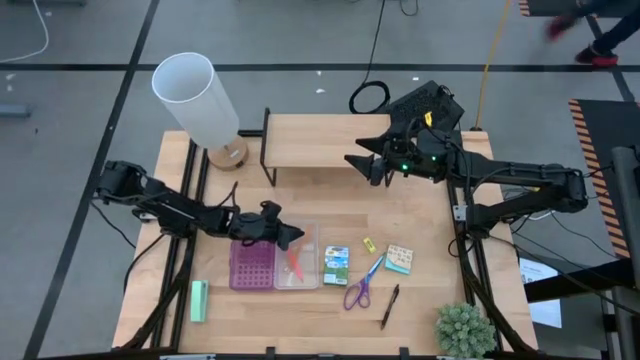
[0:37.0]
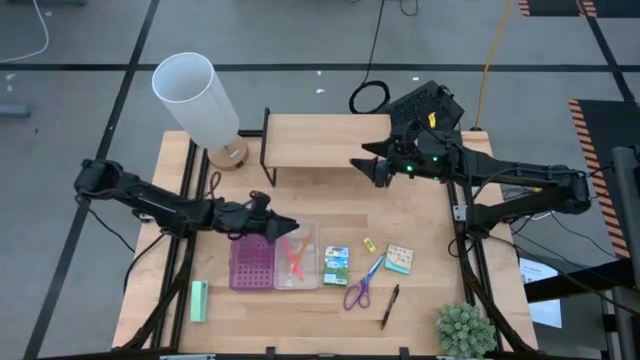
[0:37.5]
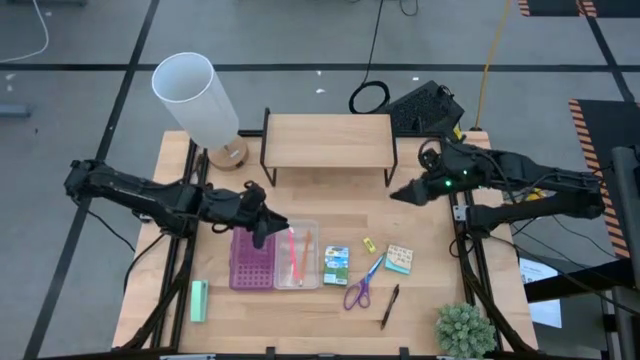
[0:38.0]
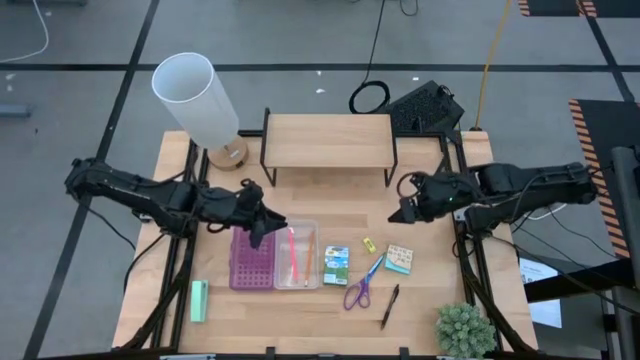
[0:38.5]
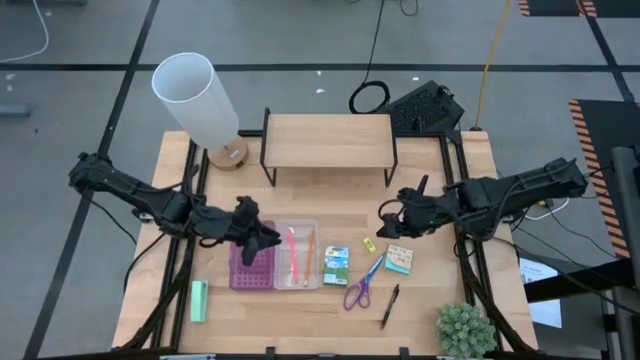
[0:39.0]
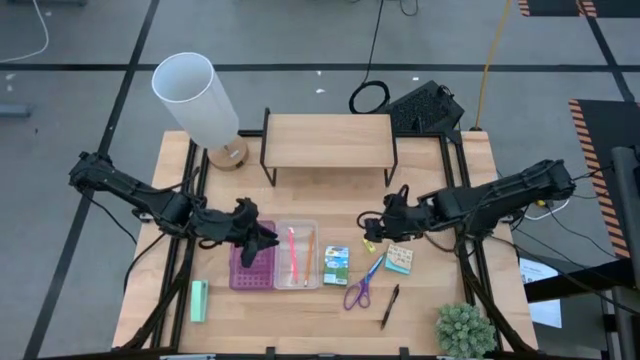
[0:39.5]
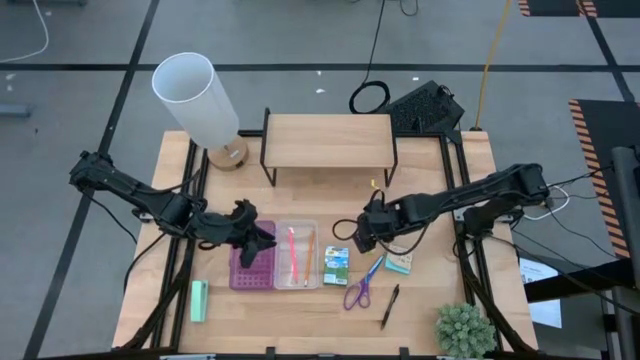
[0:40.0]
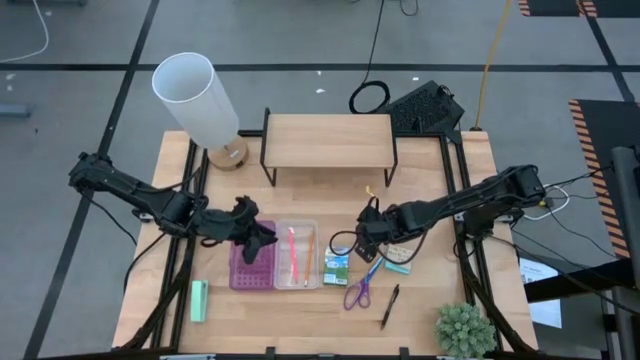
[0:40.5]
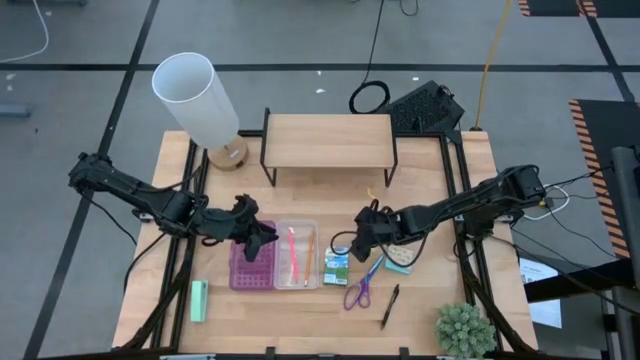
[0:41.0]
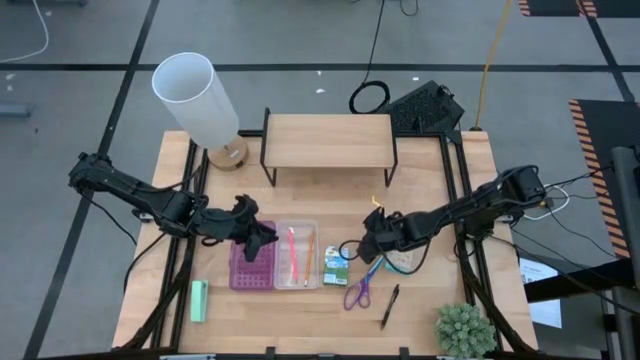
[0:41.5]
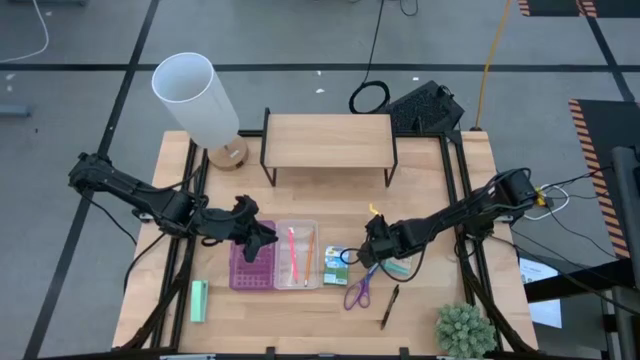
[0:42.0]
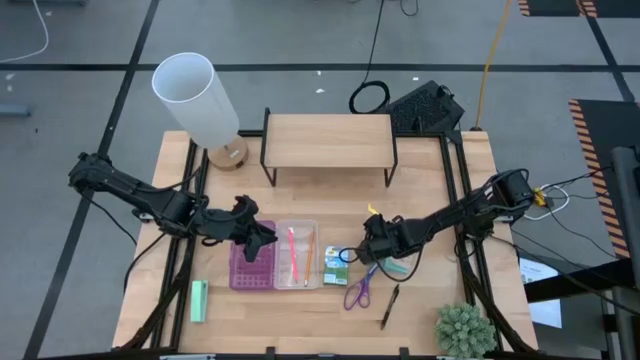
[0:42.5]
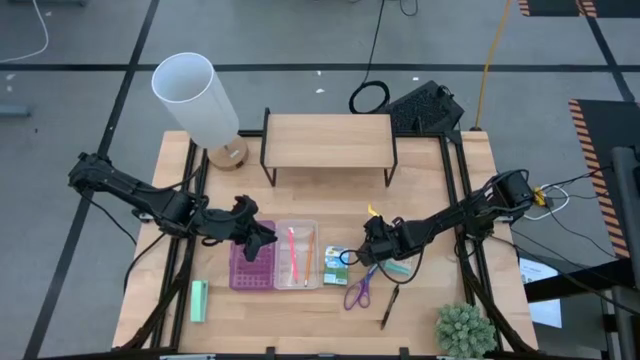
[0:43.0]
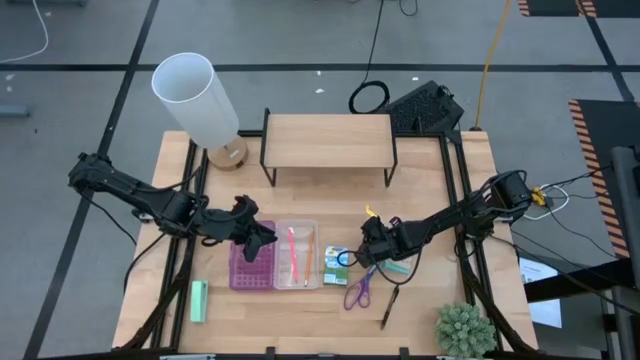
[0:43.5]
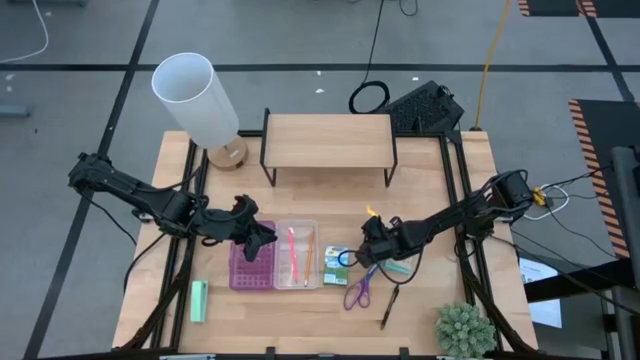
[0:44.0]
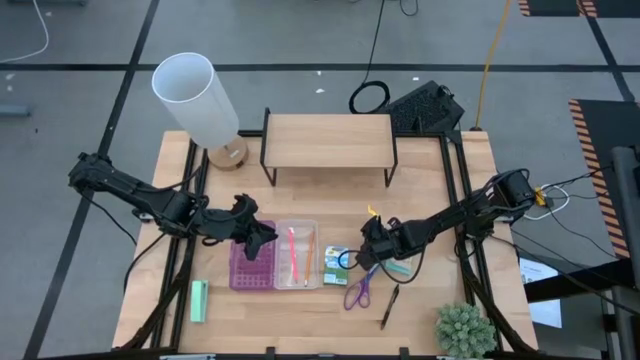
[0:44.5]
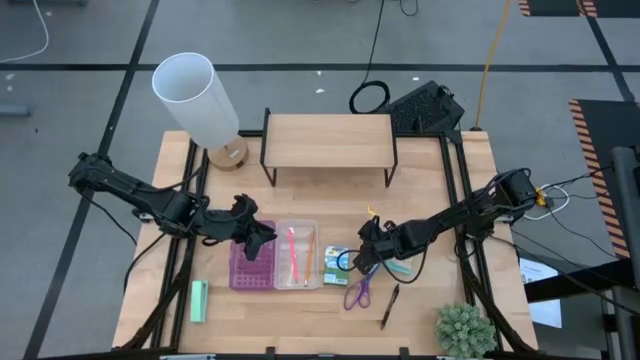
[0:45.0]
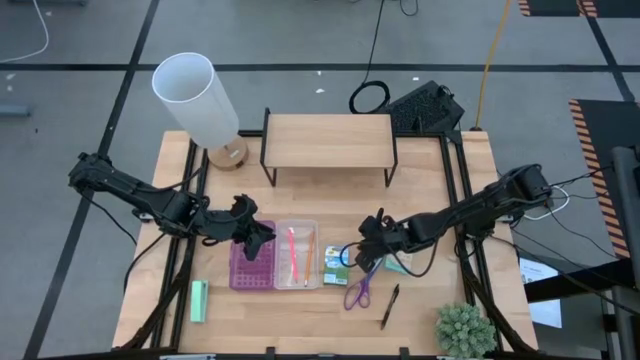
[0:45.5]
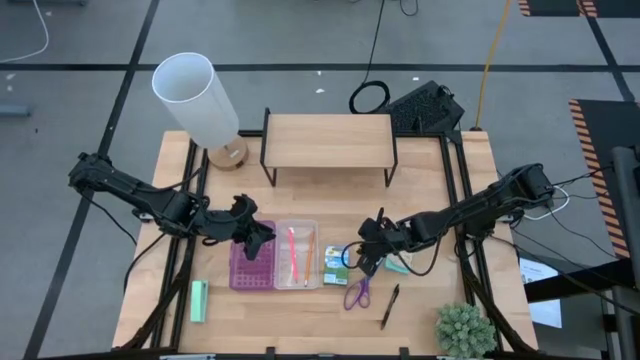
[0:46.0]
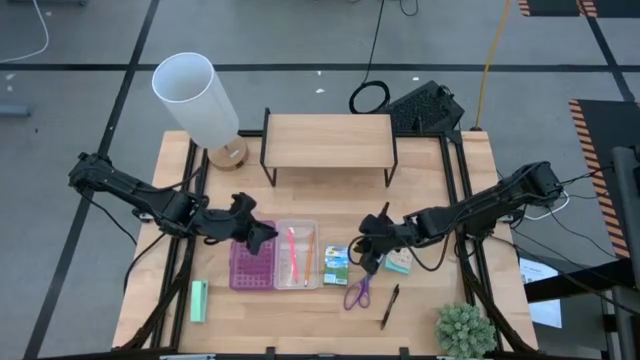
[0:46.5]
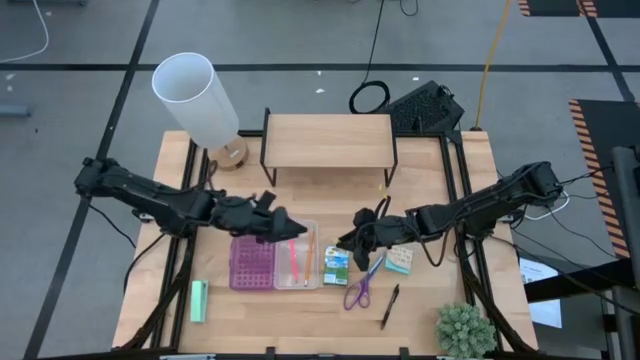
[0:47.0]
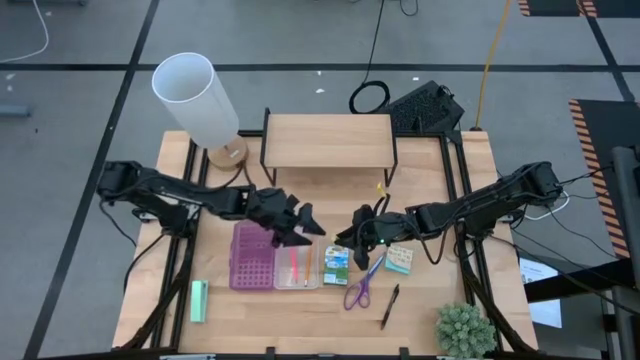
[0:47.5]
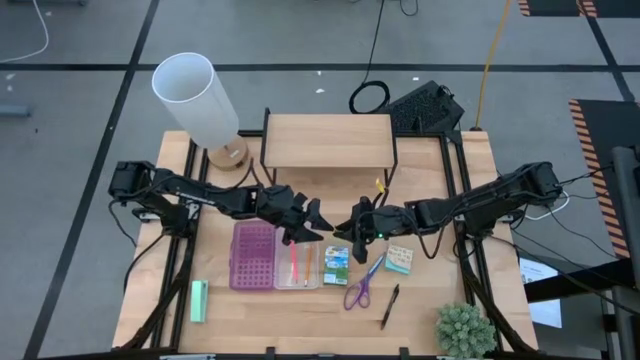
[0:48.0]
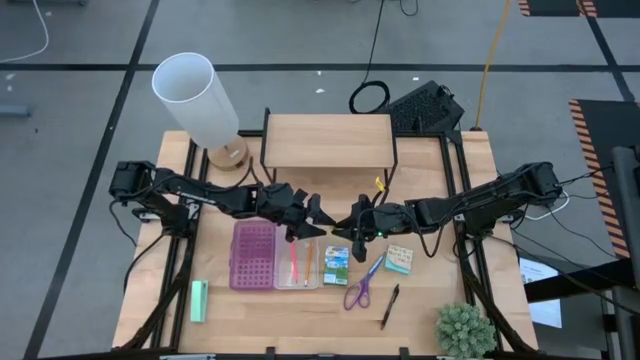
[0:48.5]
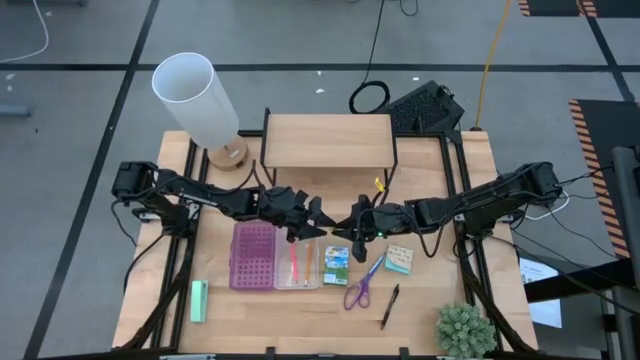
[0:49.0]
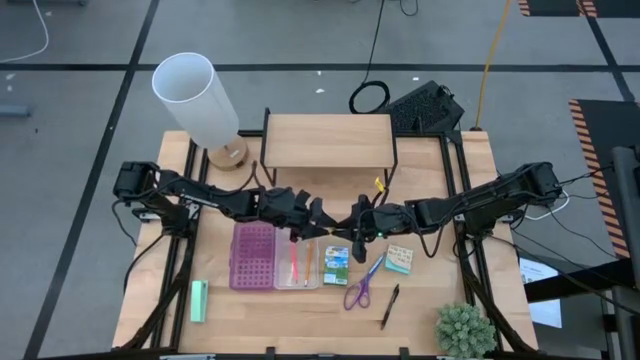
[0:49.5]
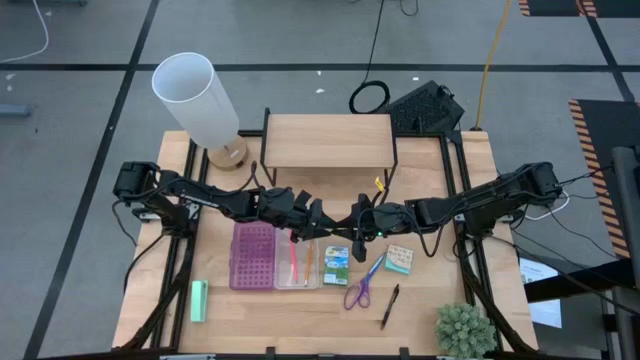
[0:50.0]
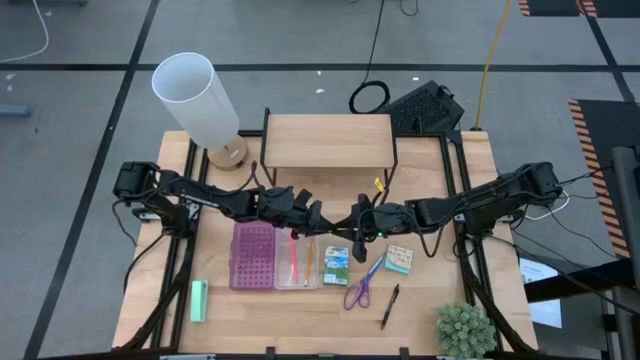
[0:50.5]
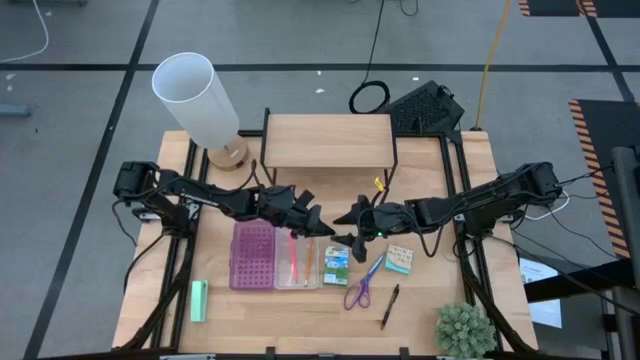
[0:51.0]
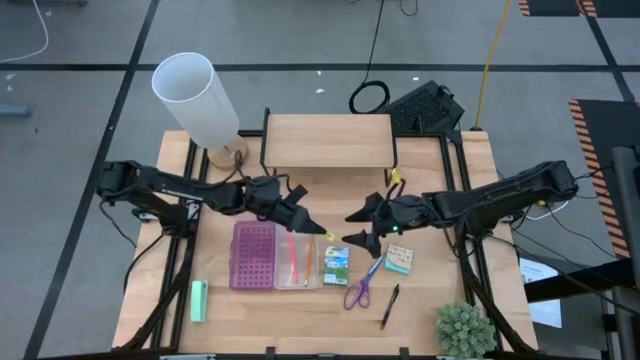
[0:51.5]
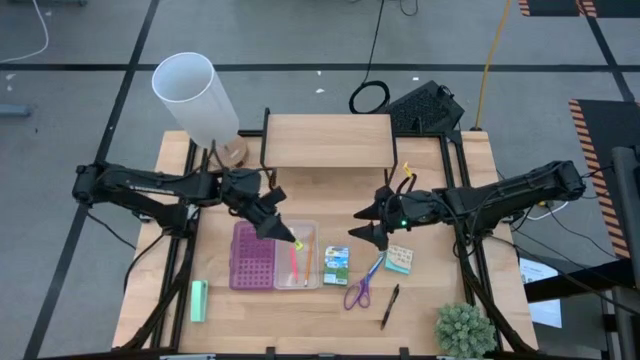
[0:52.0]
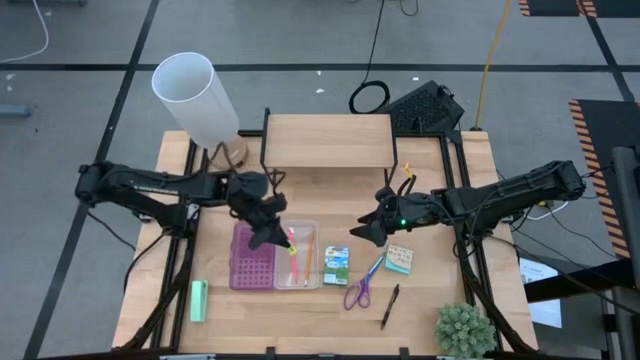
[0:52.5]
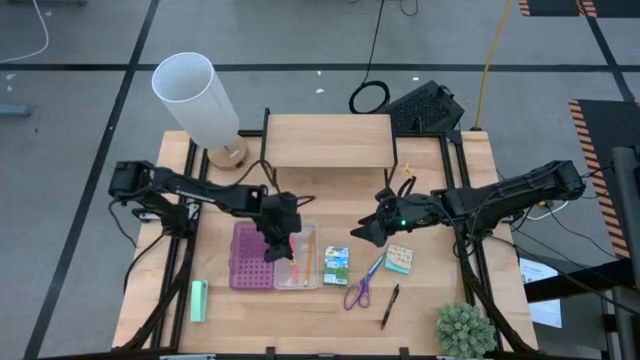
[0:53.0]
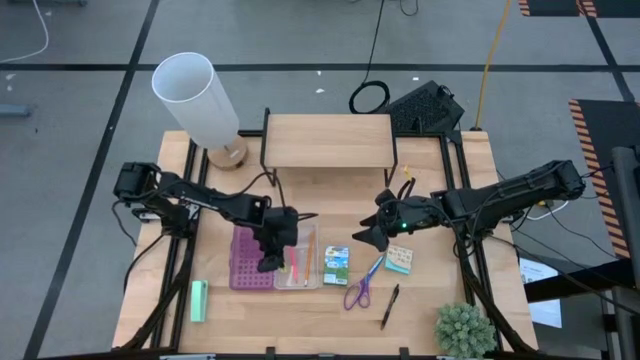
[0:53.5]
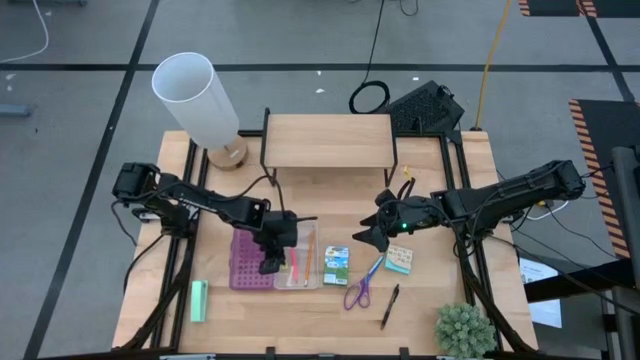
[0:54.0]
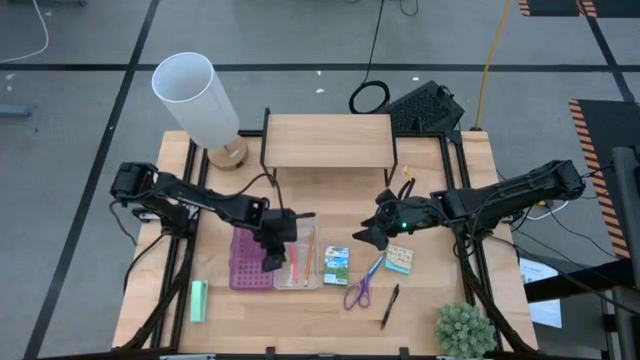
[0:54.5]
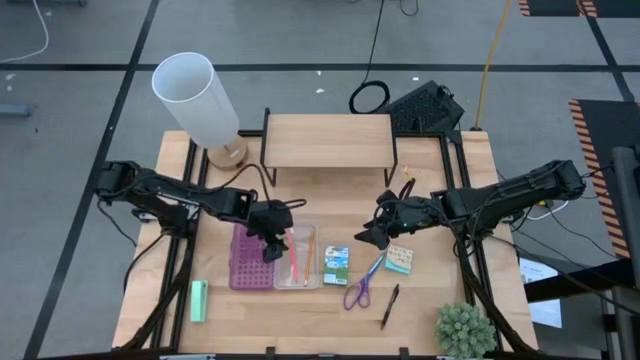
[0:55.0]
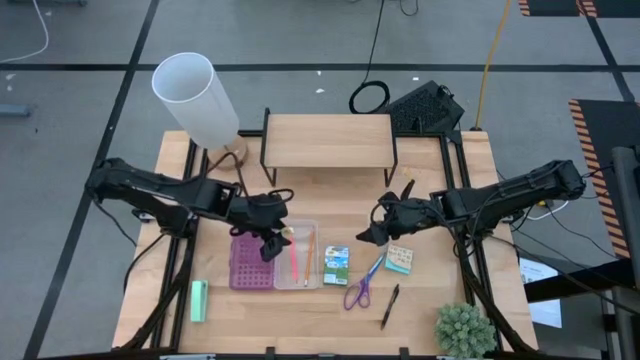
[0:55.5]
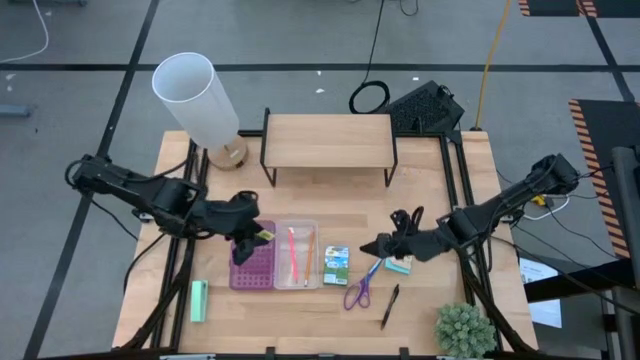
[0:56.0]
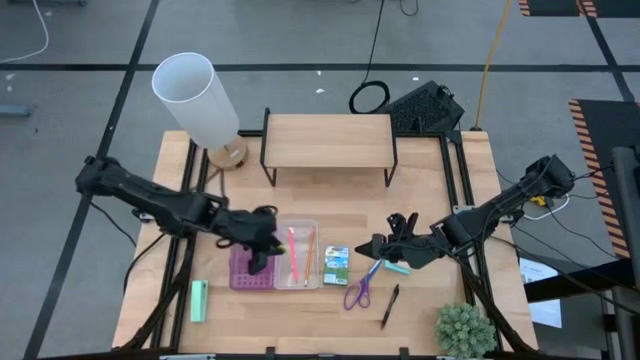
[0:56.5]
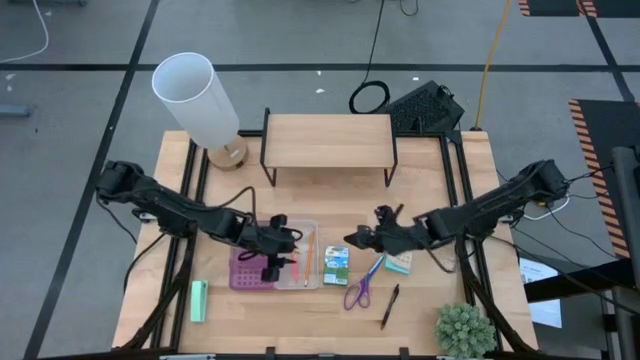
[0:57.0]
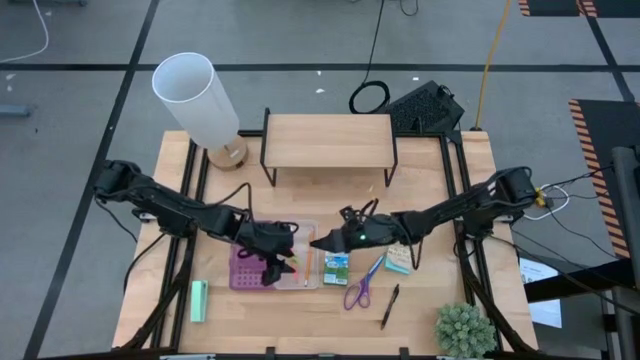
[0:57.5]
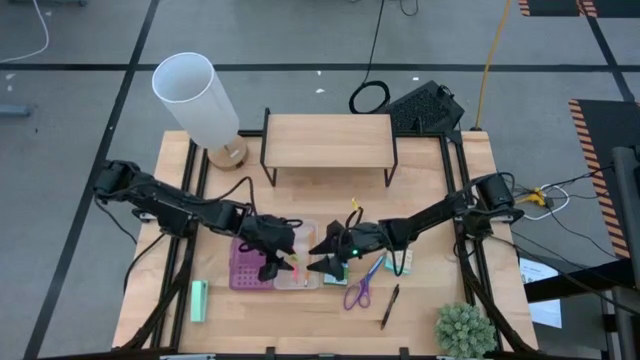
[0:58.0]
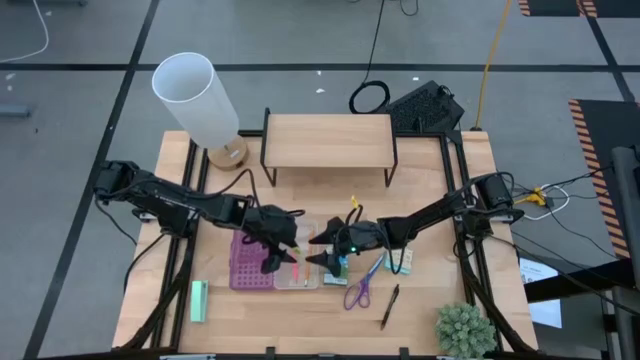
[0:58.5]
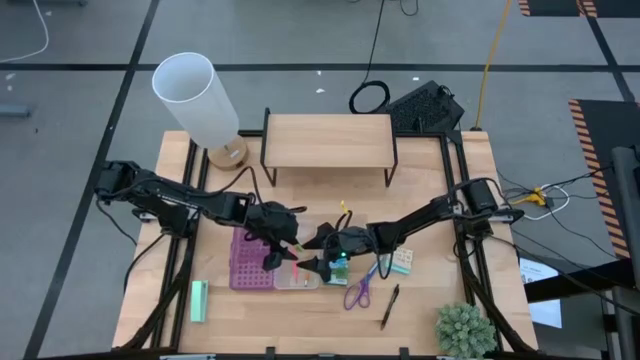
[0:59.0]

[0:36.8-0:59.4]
Task: Pack school essentials
Put the yellow eraser into the violet supply box
